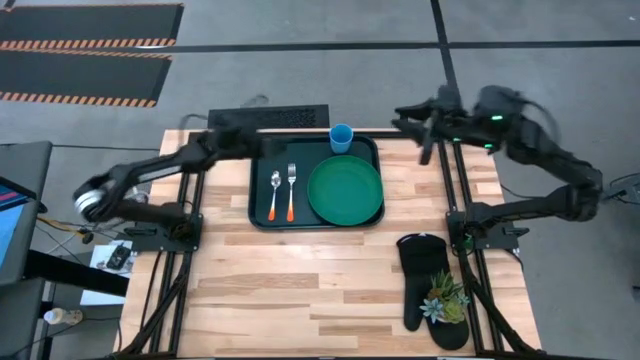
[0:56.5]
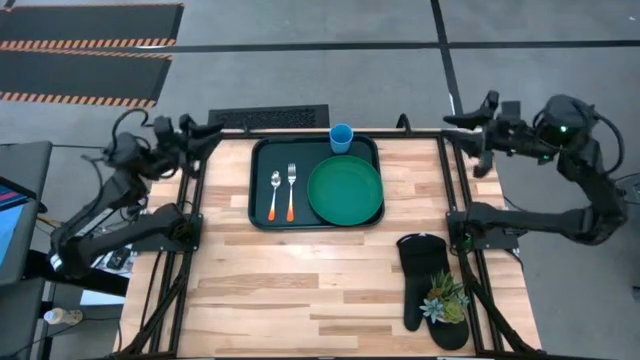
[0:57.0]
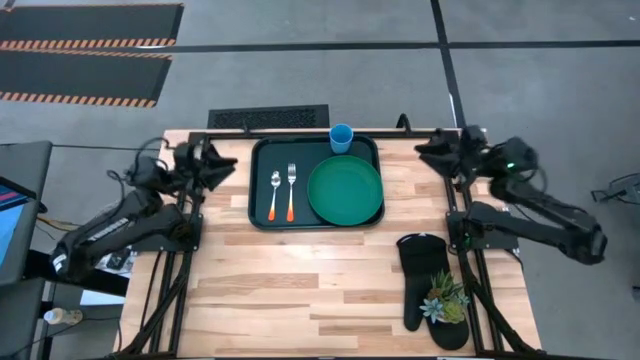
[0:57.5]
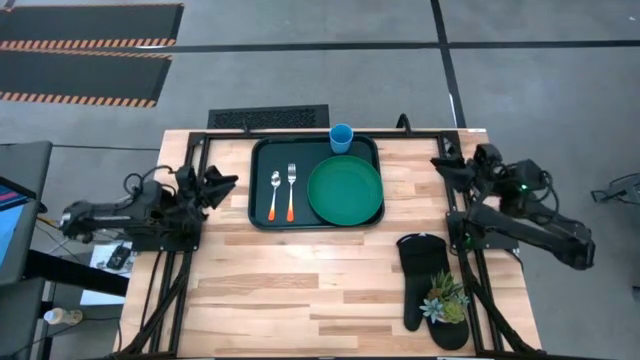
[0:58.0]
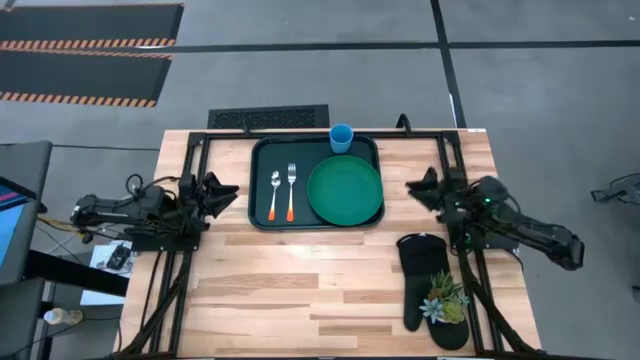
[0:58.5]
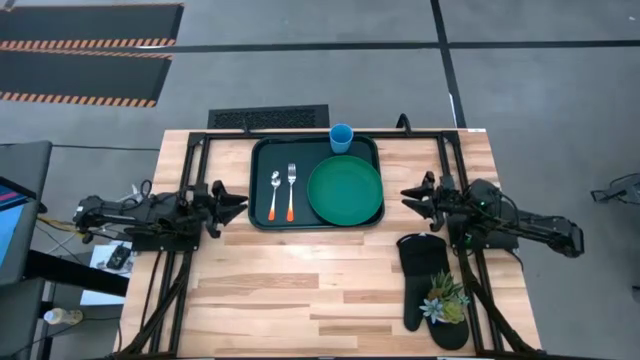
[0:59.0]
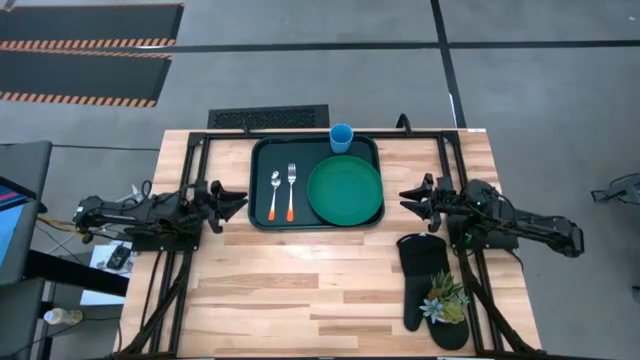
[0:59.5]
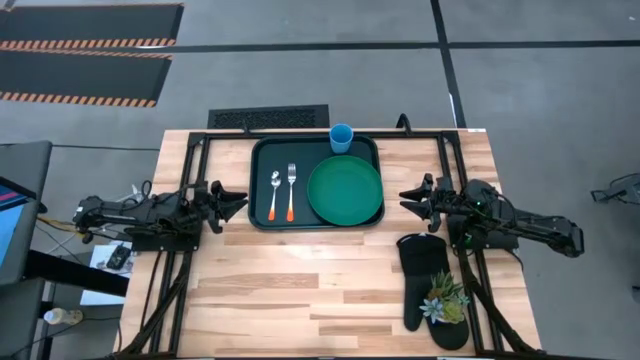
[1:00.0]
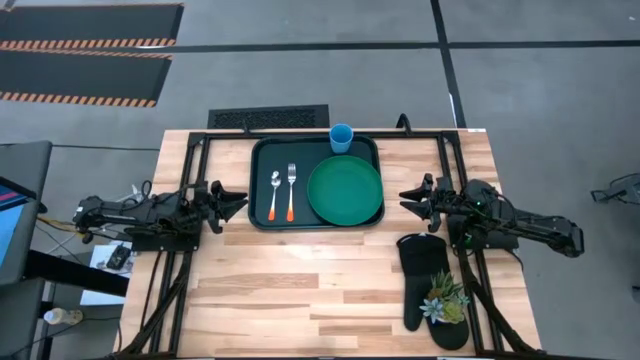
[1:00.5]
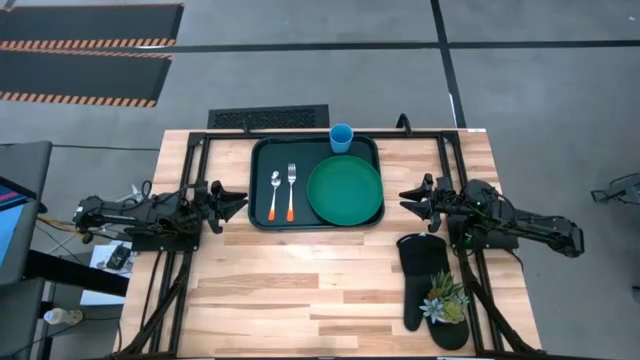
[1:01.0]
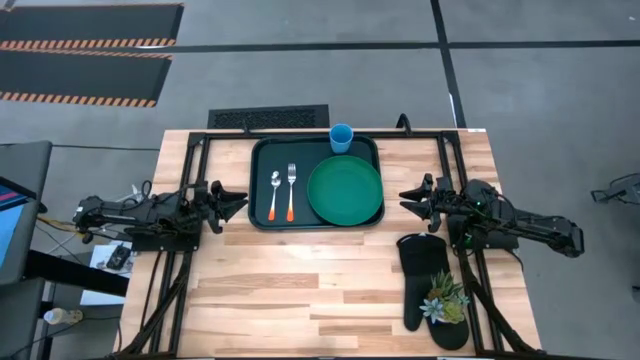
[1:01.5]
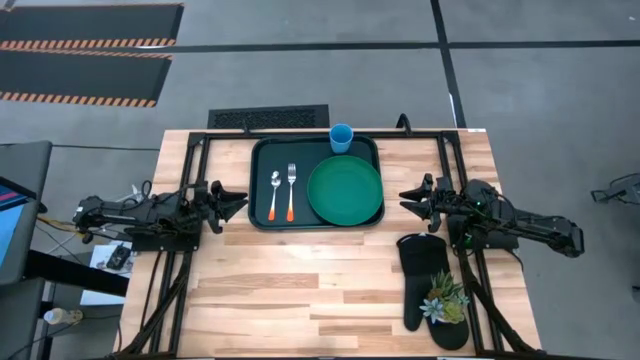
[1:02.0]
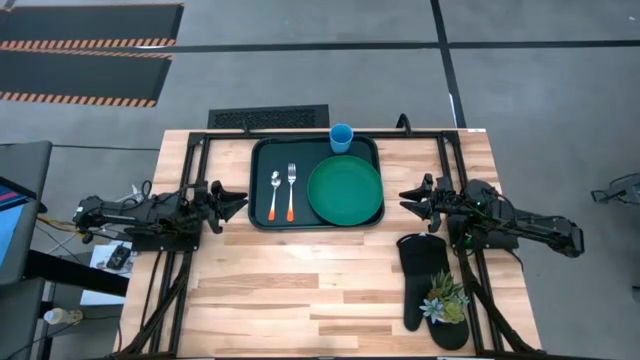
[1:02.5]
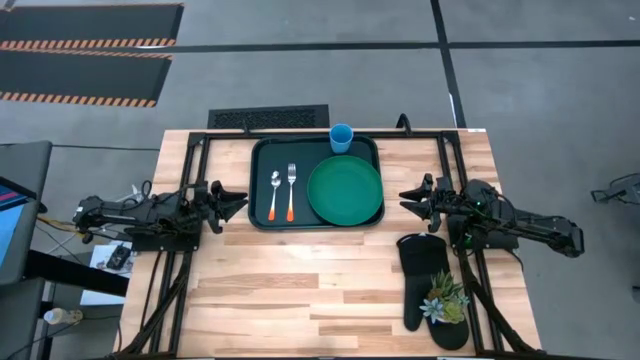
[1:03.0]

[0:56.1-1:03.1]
Task: Pick and place plate/cup/fork/spoon on tray
Return to Home Position

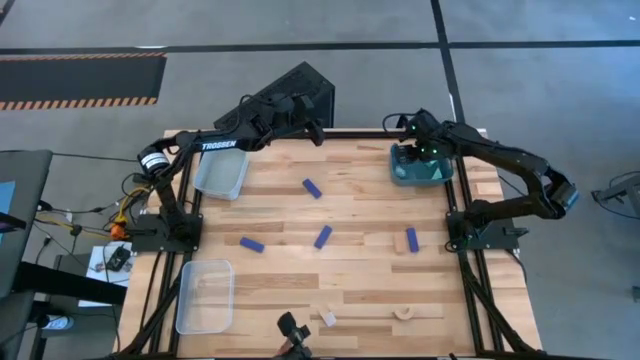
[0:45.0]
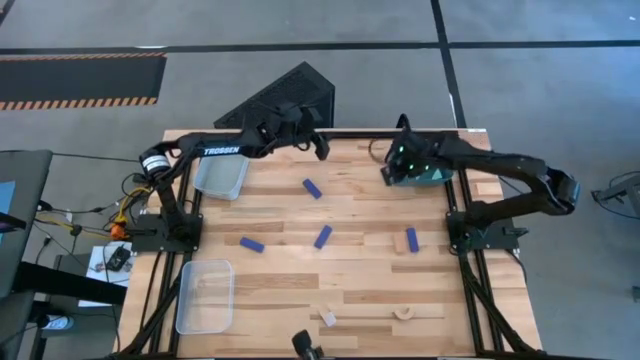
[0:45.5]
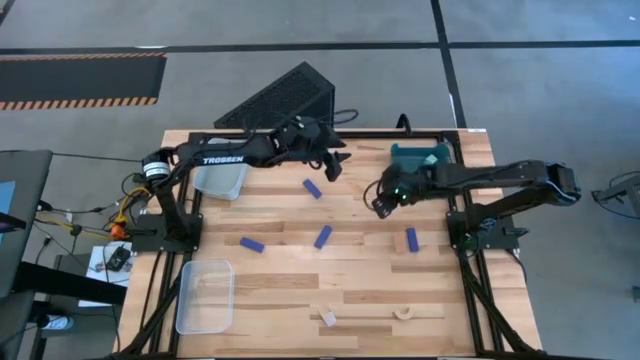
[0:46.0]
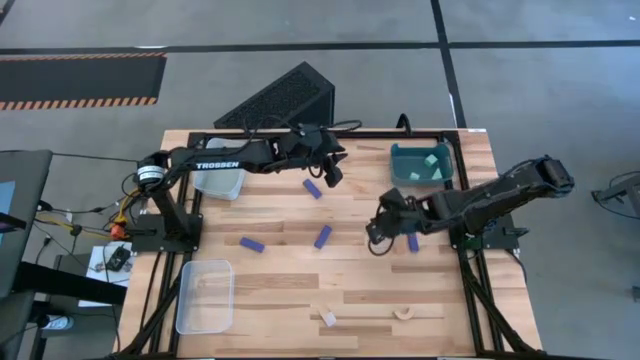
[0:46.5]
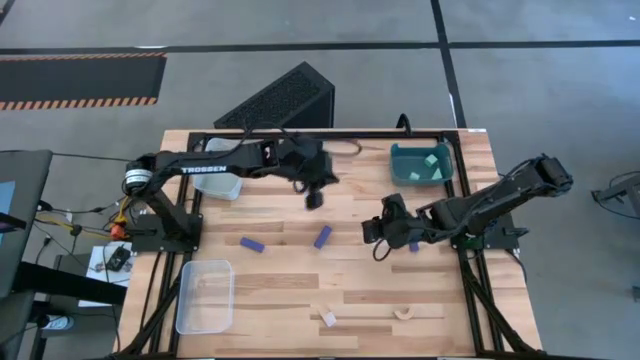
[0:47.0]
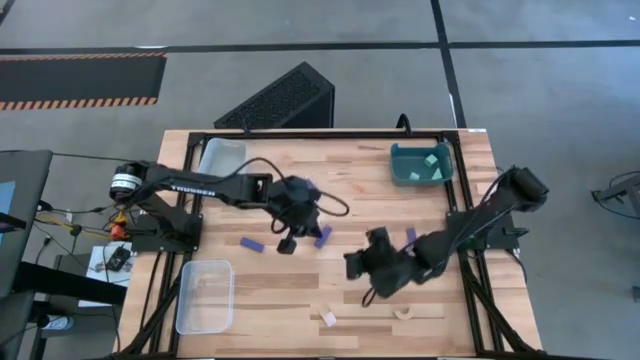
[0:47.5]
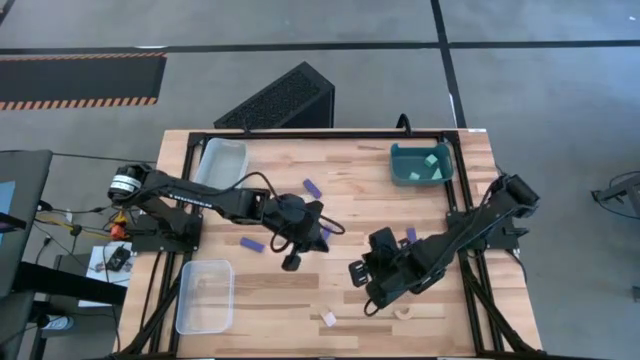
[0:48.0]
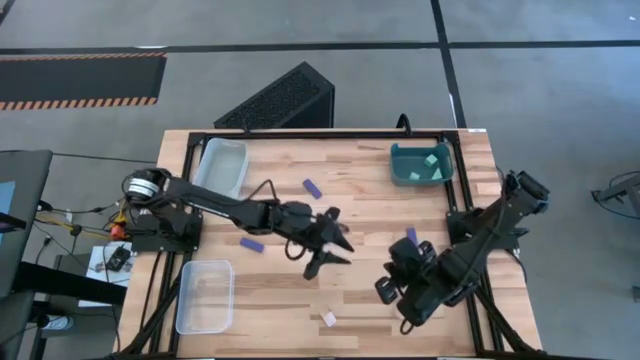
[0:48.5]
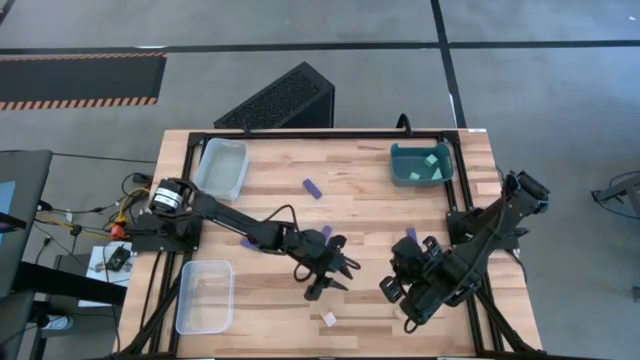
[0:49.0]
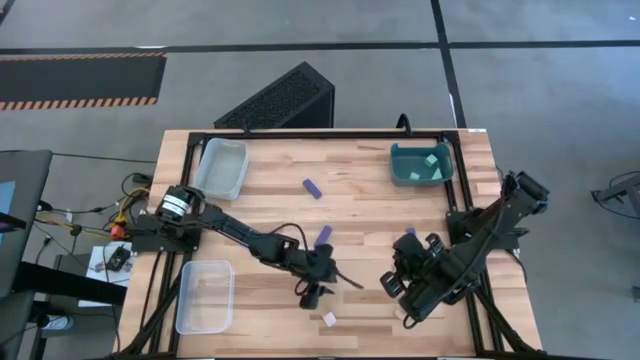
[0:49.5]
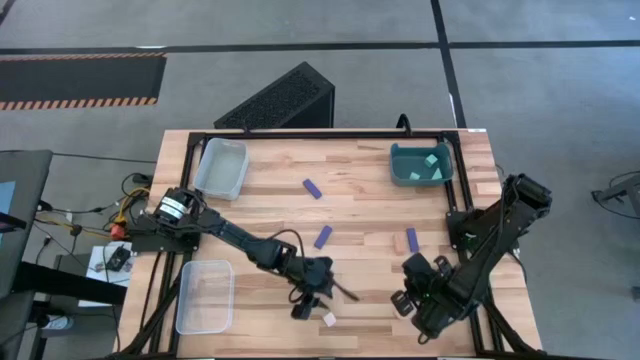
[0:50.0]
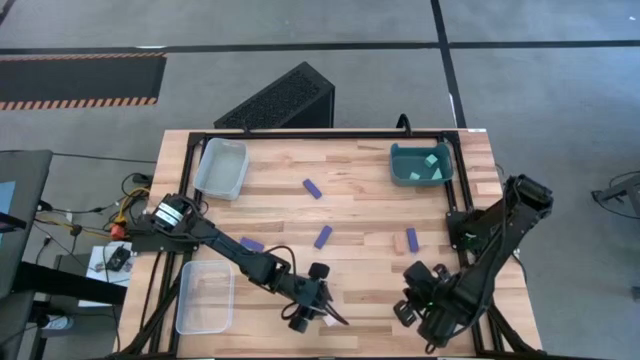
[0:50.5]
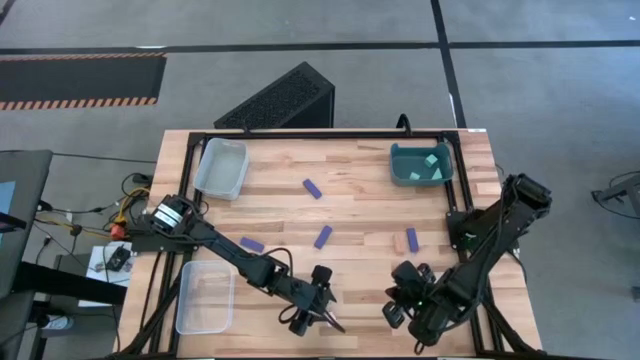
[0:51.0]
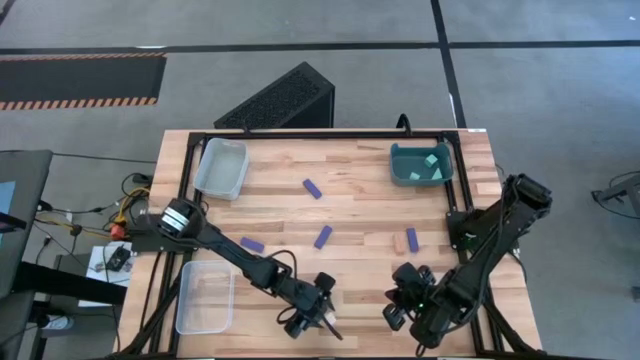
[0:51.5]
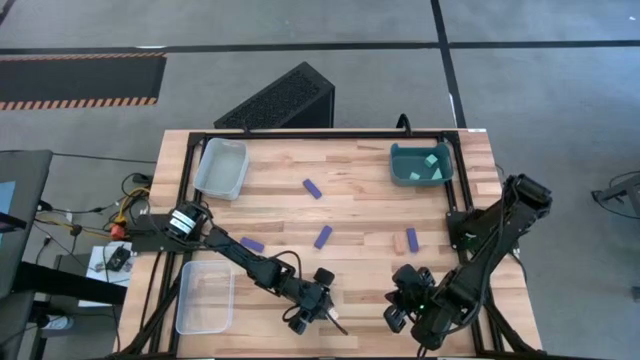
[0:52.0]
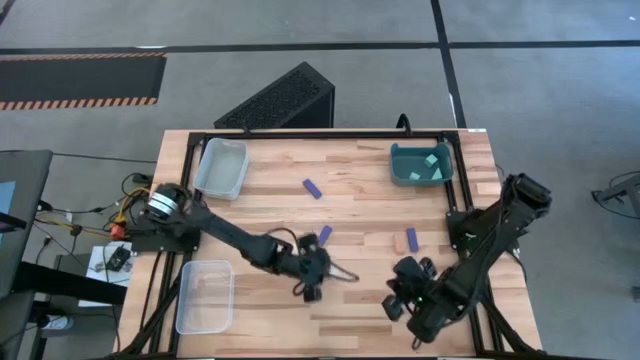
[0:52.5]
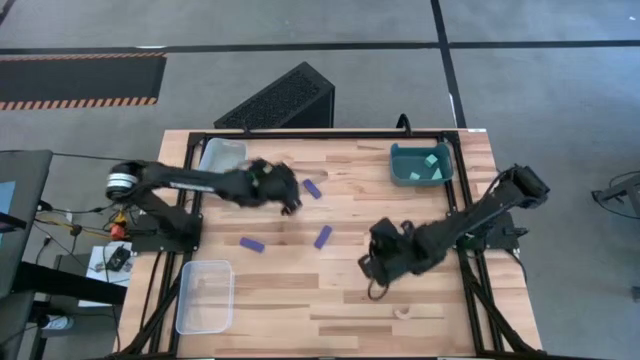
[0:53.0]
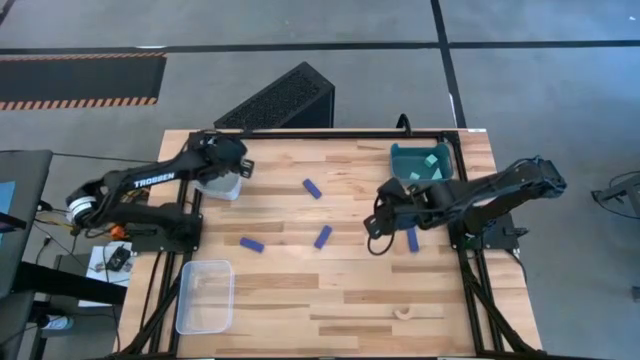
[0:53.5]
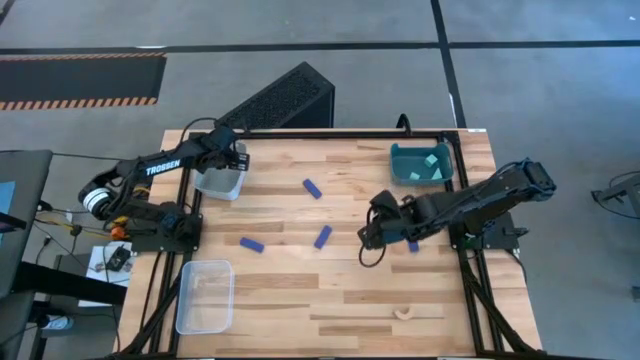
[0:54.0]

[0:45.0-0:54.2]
Task: Sort & place blocks by color
Put the light brown block into the white bin

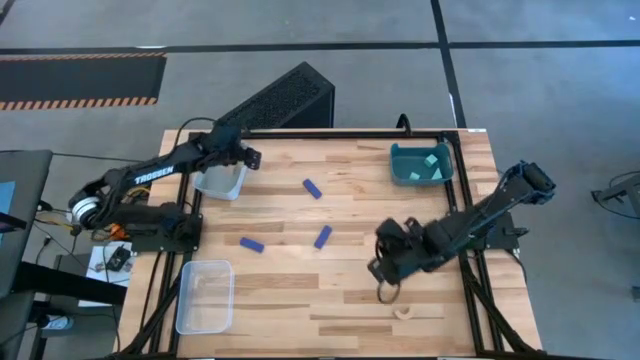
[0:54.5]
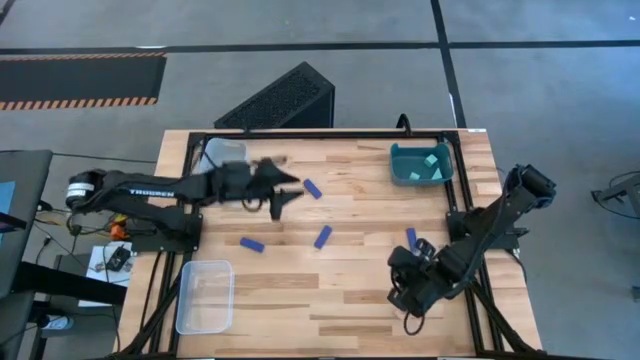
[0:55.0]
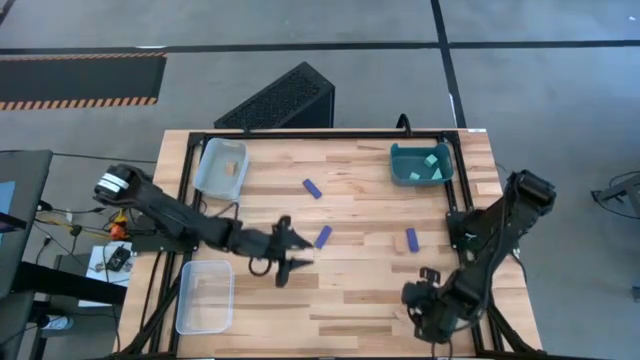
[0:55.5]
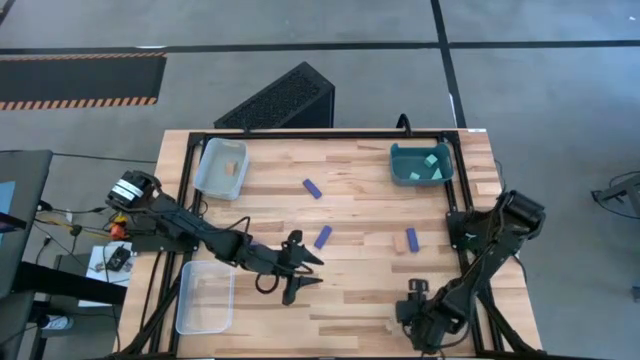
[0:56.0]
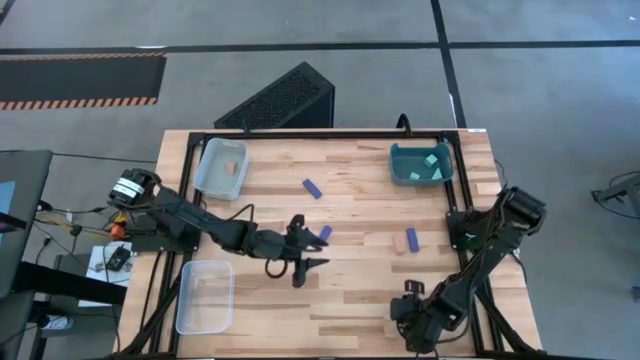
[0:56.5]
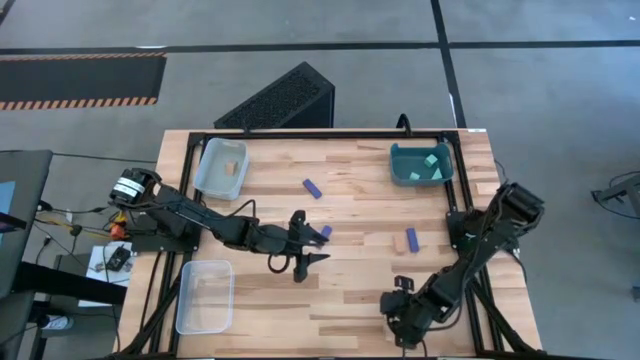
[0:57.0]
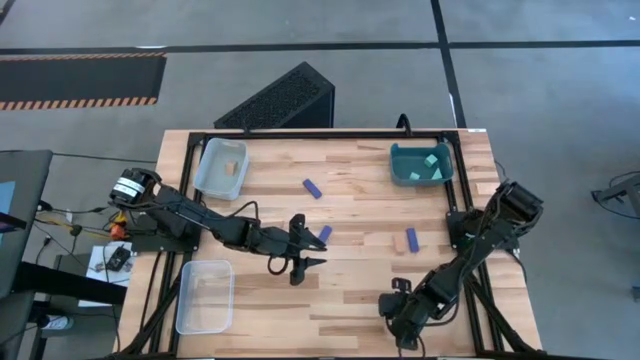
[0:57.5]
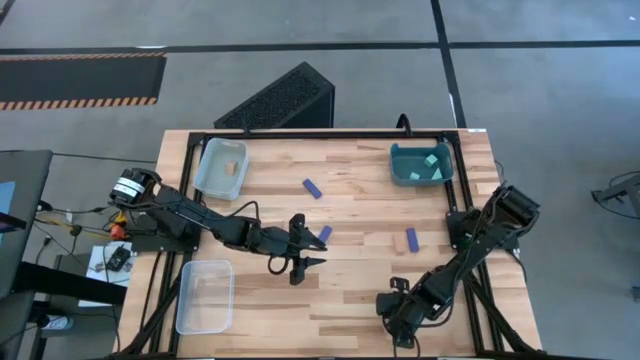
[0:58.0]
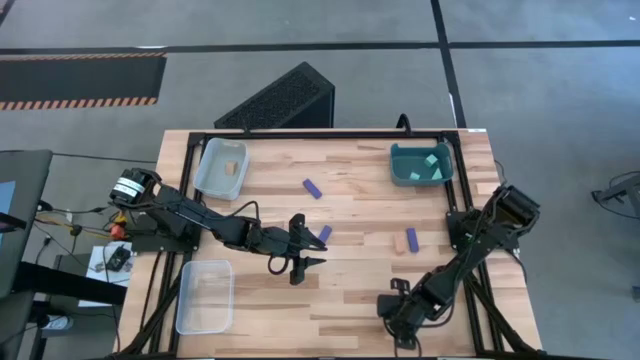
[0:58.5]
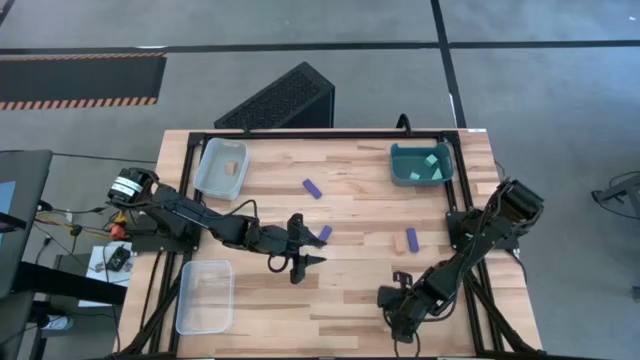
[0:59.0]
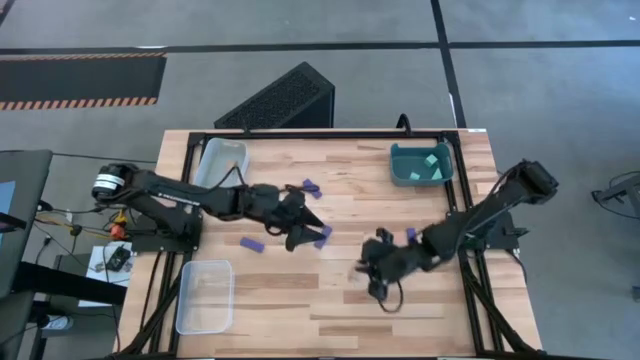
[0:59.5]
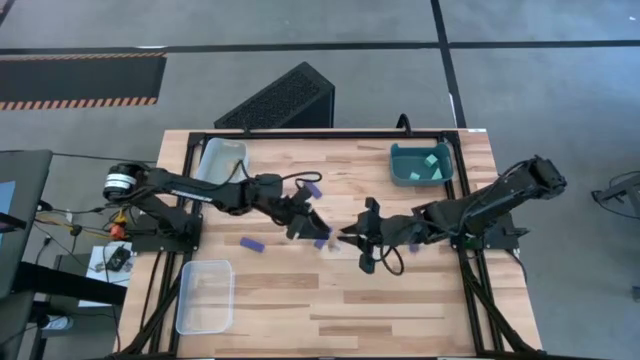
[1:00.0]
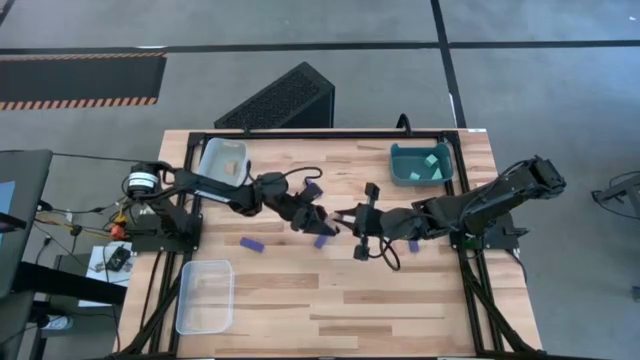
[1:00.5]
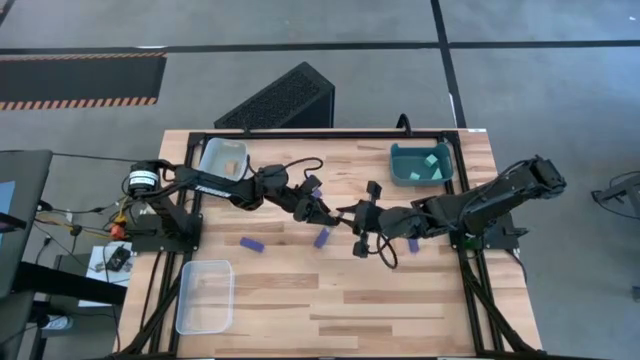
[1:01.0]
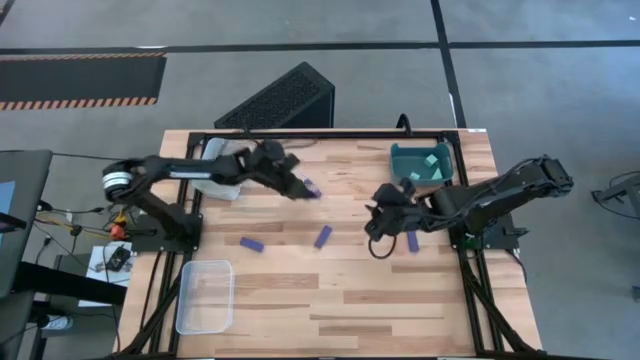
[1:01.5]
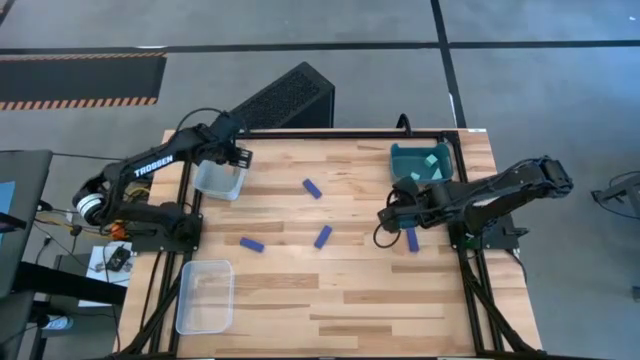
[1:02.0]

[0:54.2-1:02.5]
Put the light brown block into the white bin
